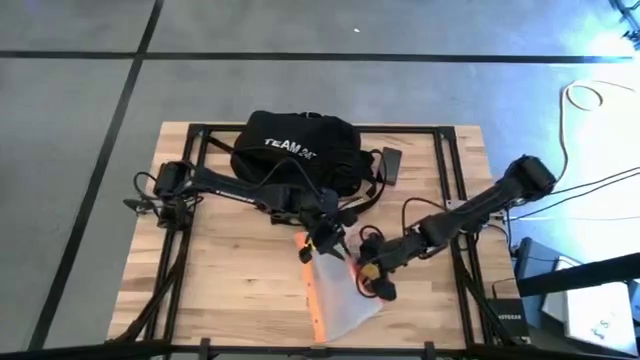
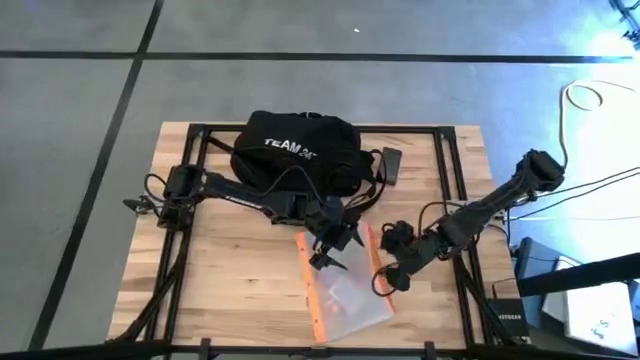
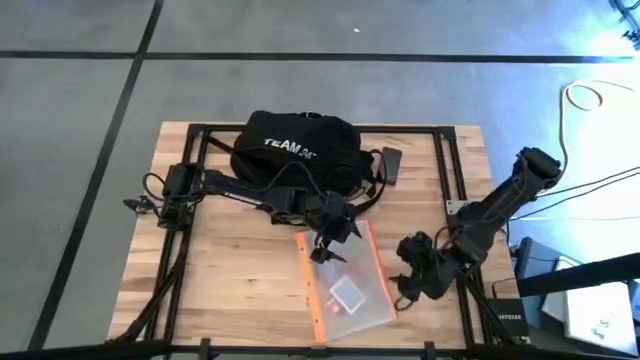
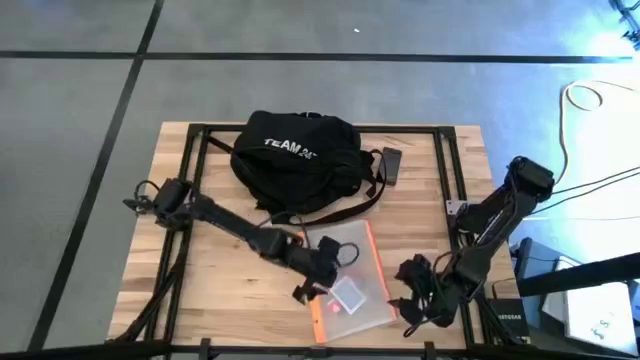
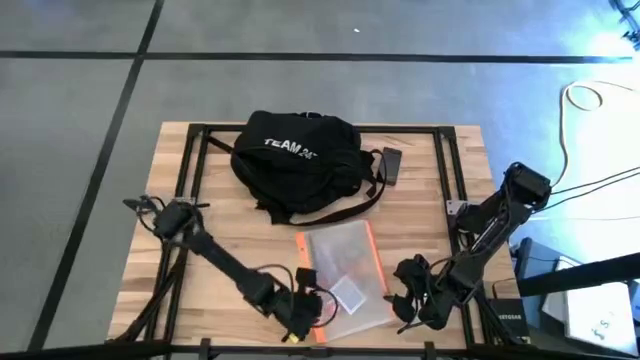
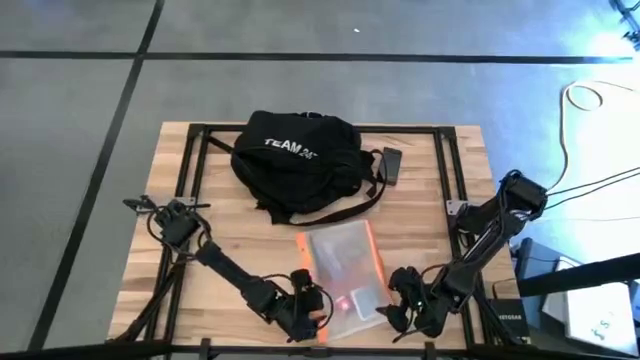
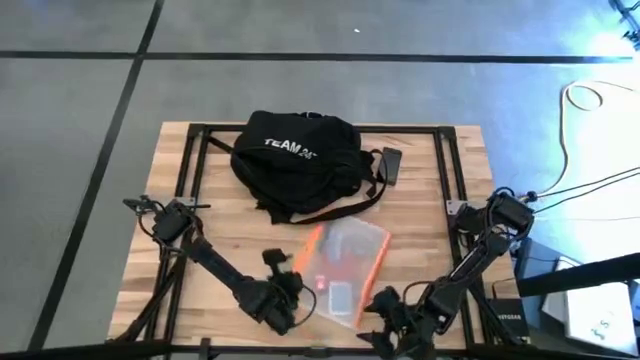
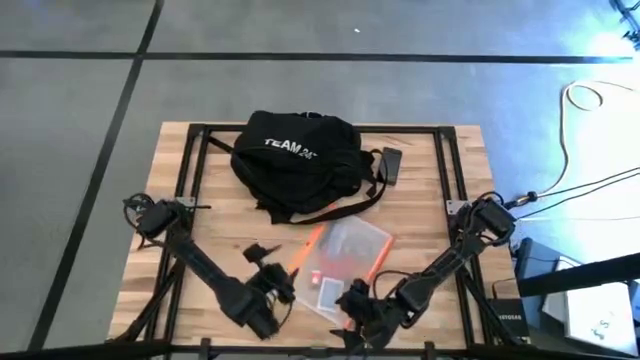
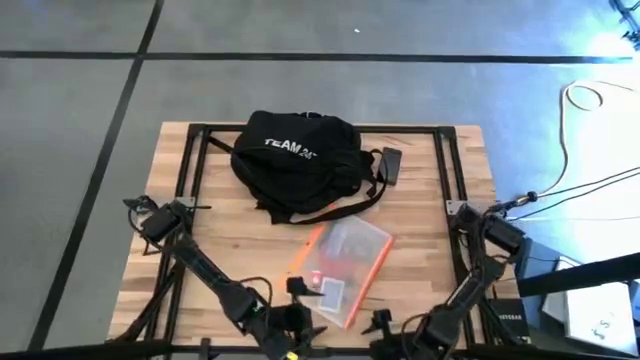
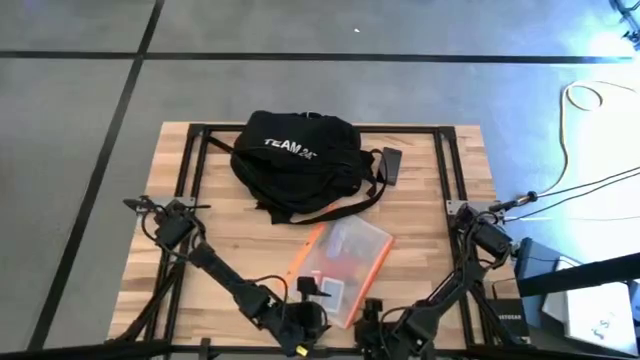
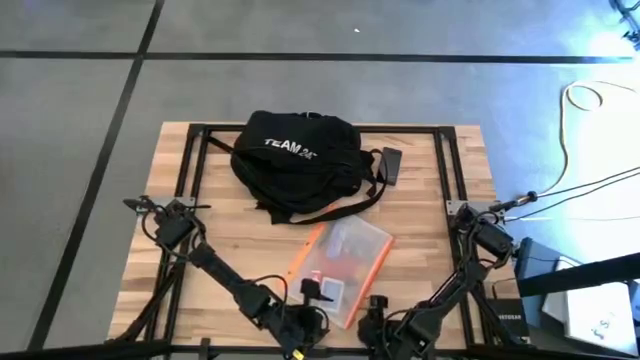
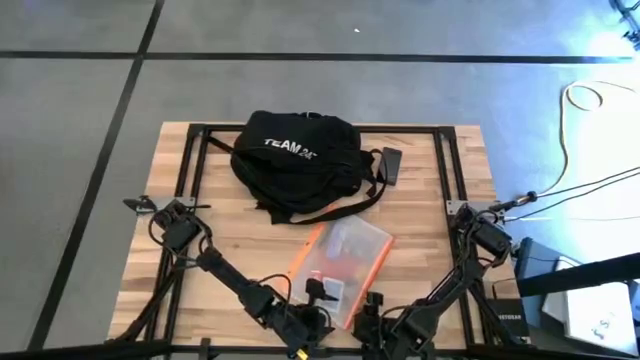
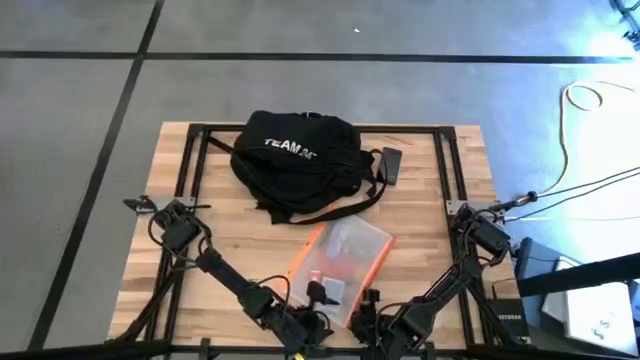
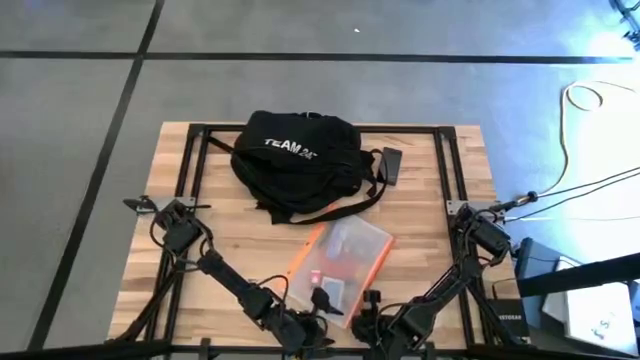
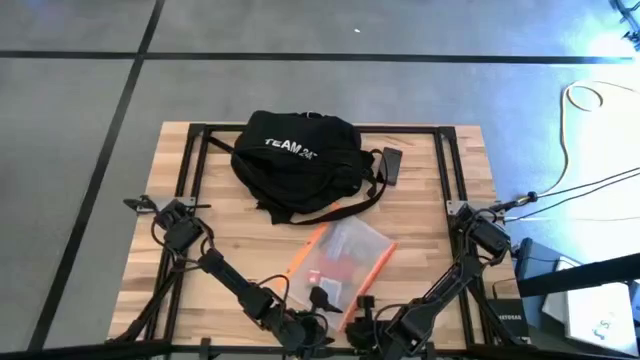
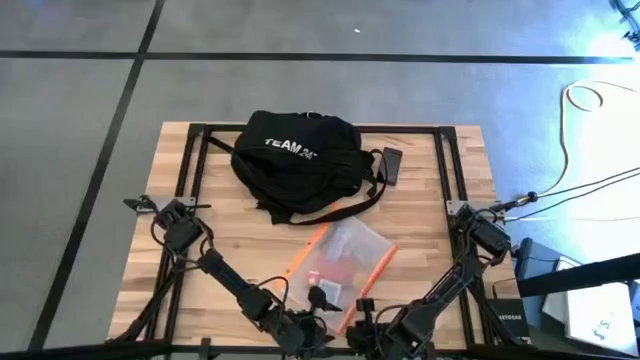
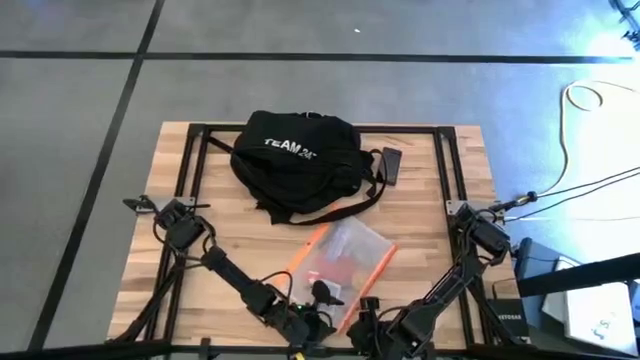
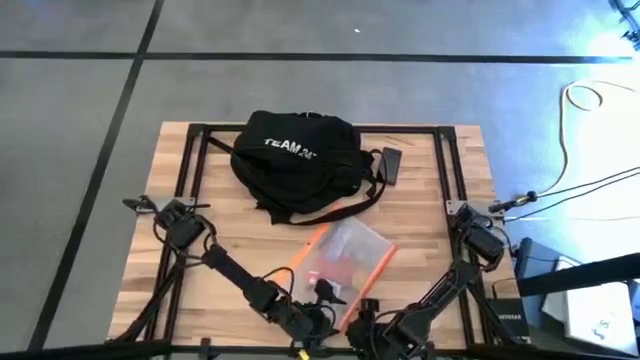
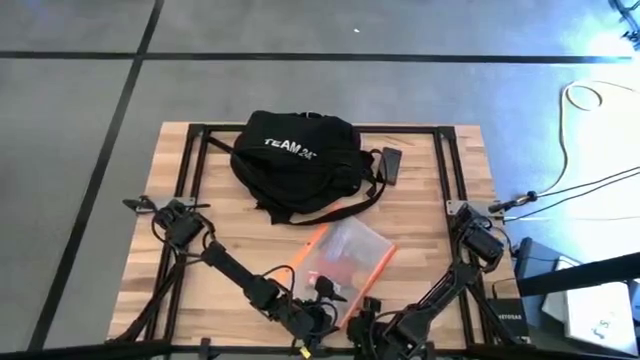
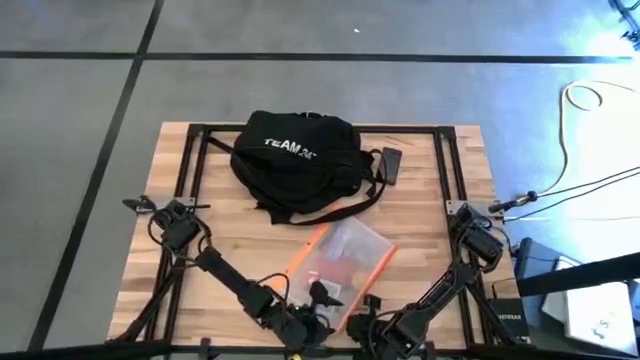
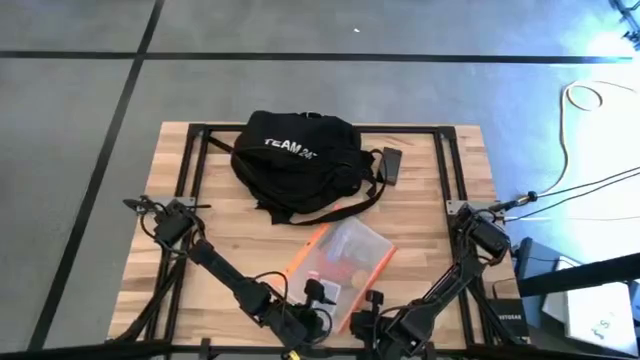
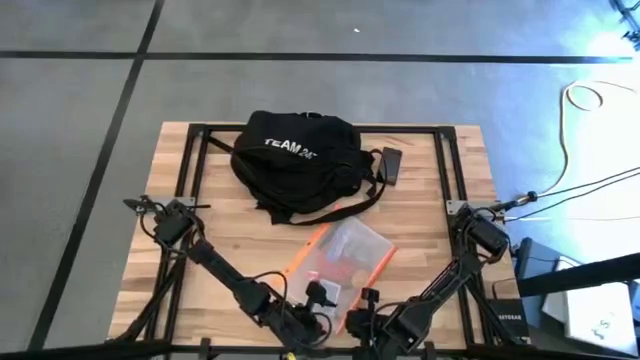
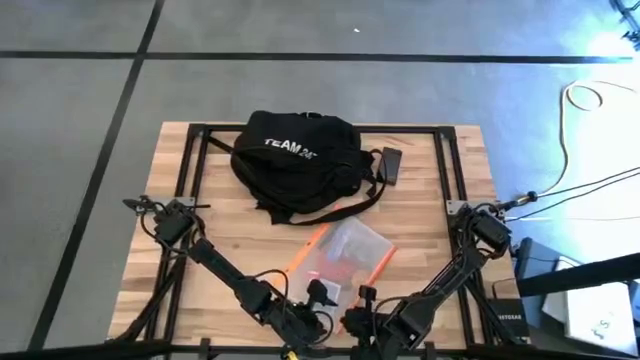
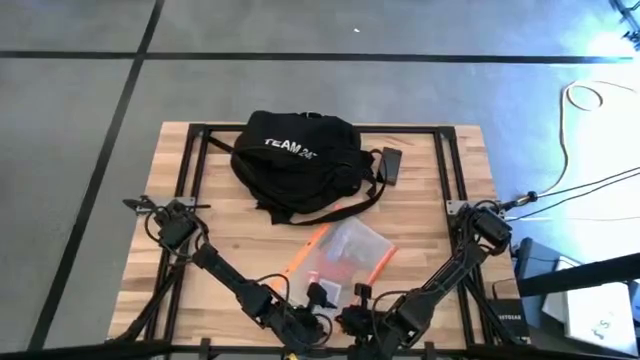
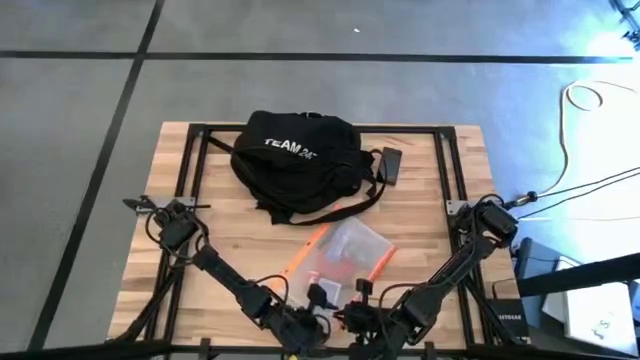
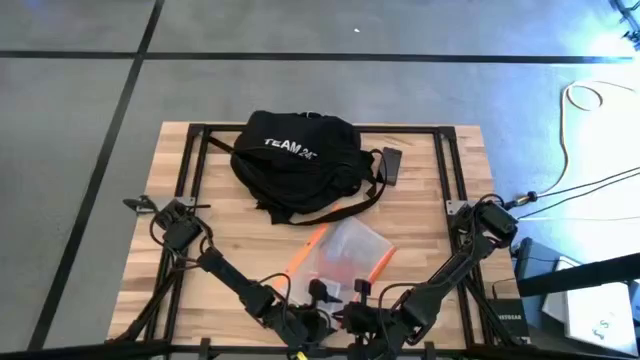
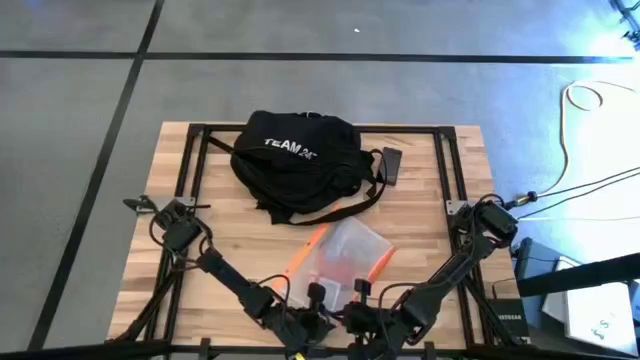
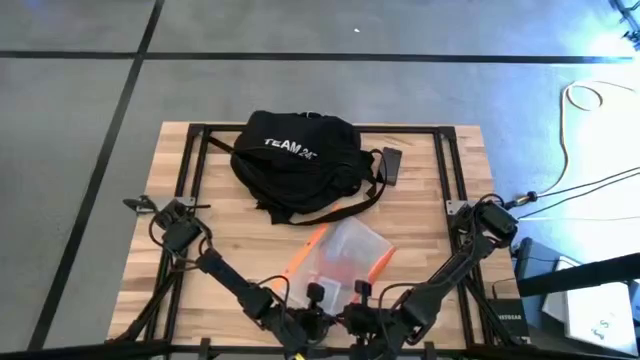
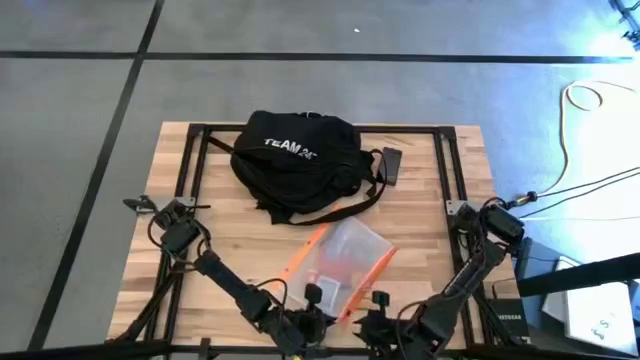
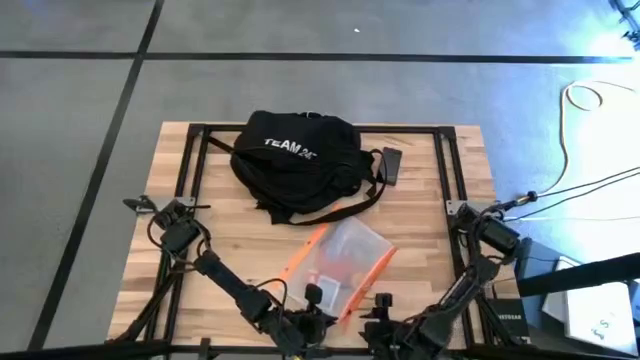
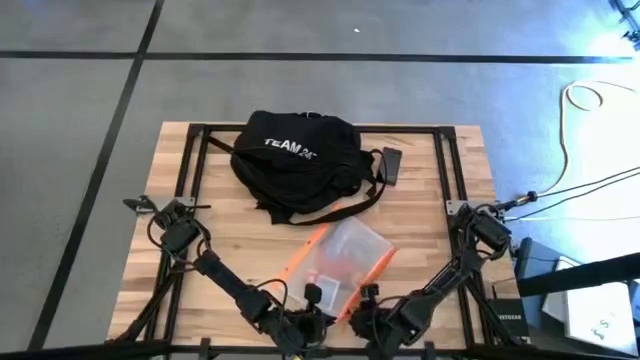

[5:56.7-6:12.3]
Task: Unpack backpack
Close the white zip bag

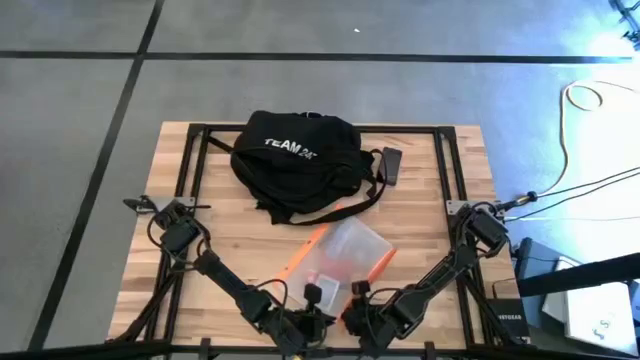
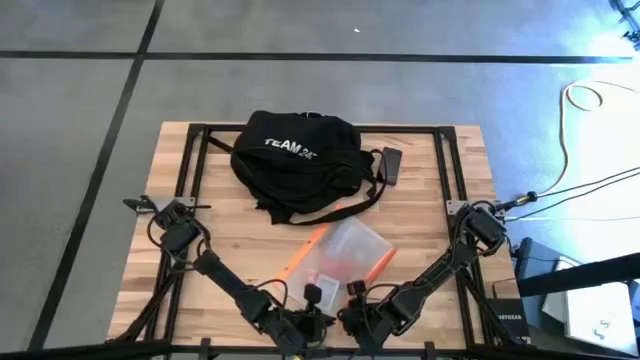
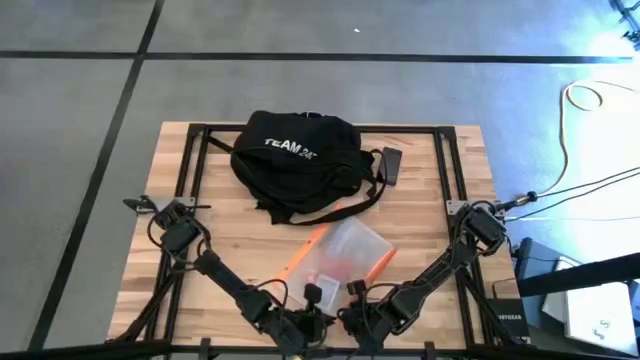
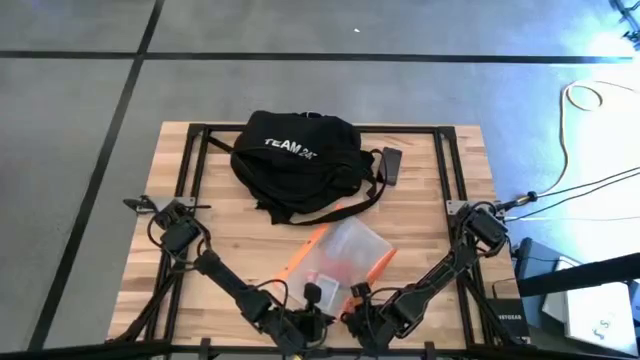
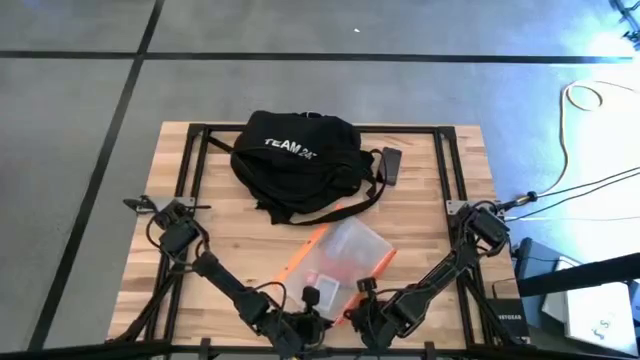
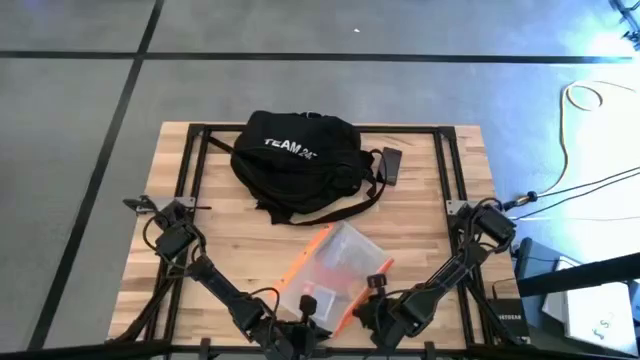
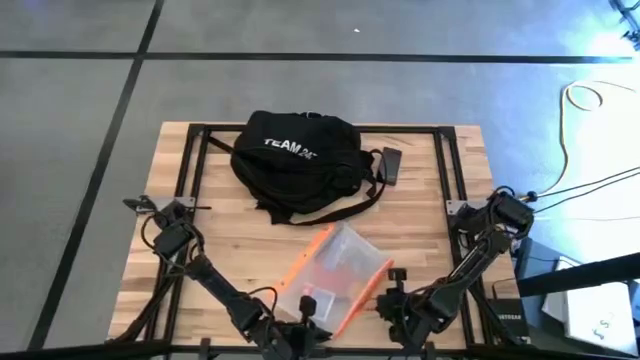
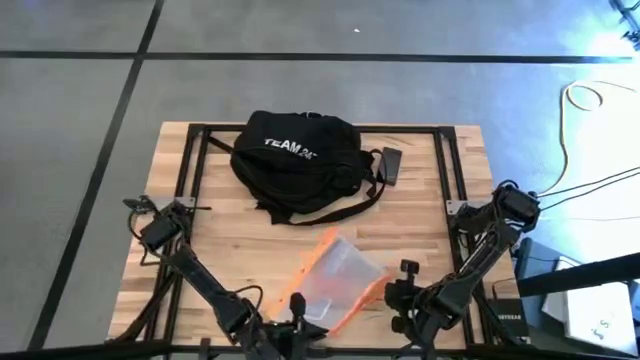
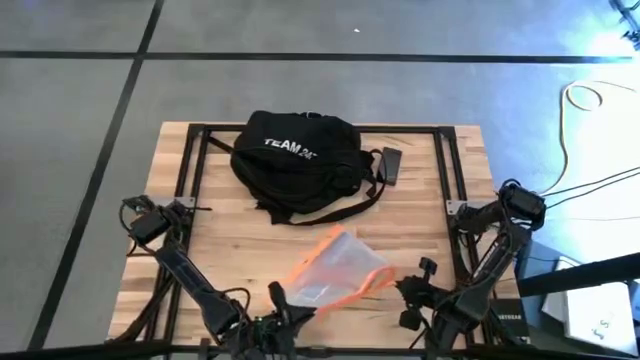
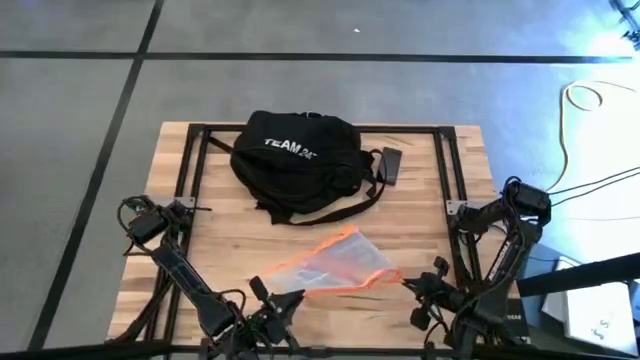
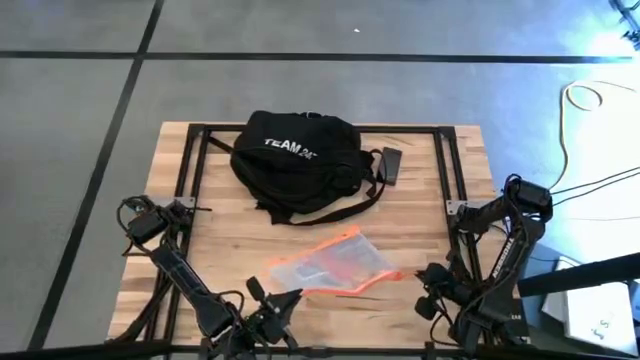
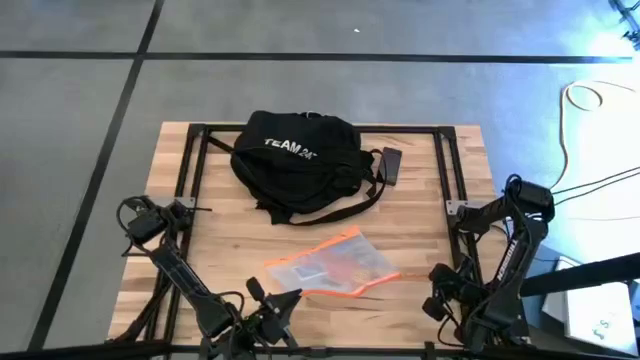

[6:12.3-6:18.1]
Close the white zip bag
